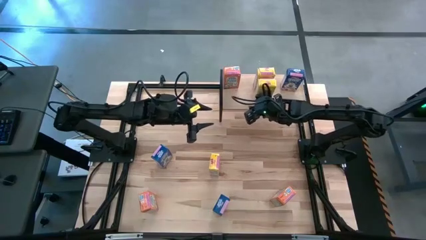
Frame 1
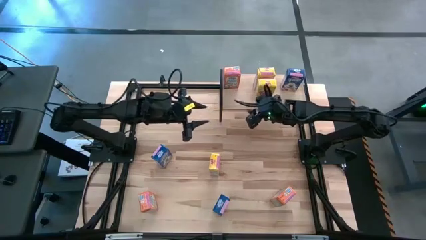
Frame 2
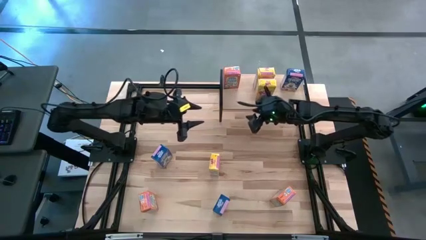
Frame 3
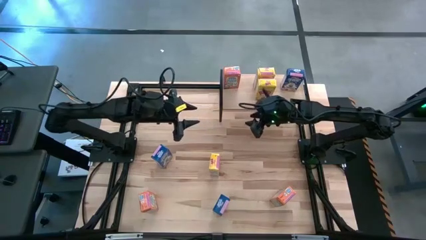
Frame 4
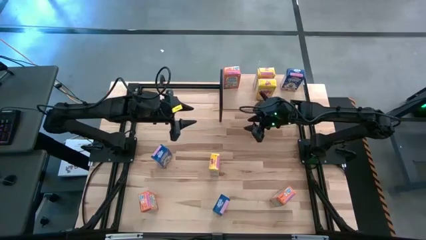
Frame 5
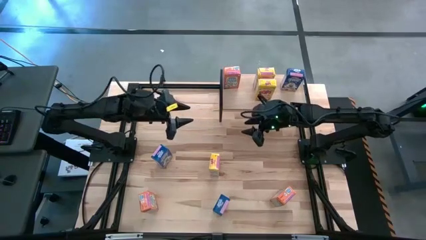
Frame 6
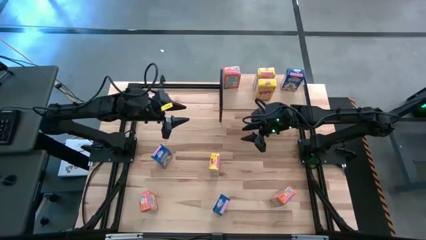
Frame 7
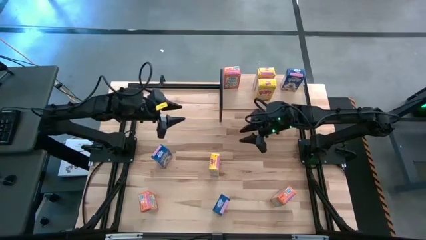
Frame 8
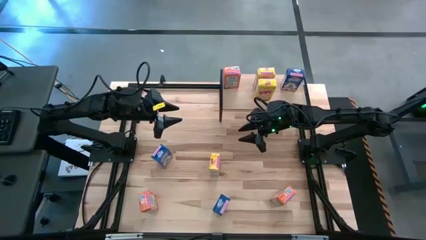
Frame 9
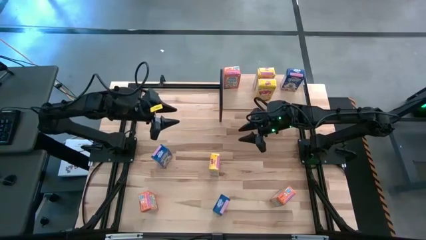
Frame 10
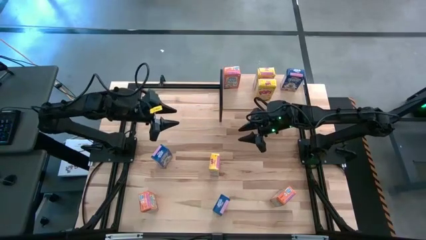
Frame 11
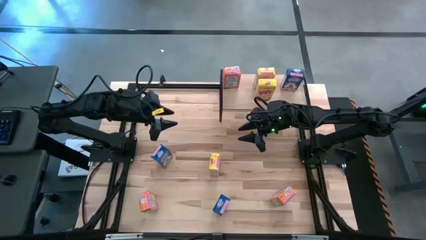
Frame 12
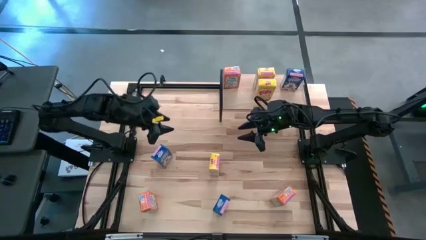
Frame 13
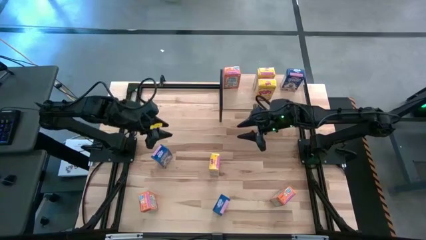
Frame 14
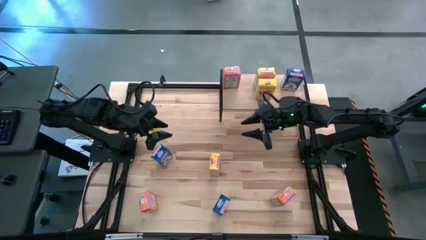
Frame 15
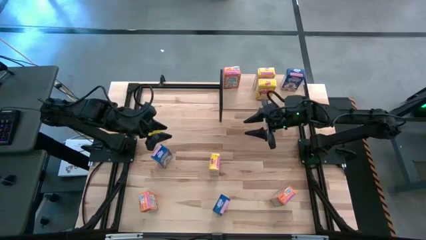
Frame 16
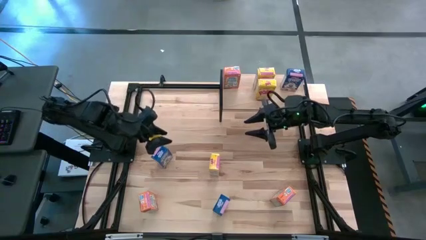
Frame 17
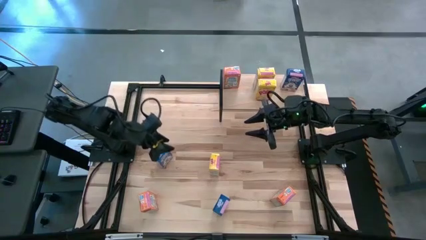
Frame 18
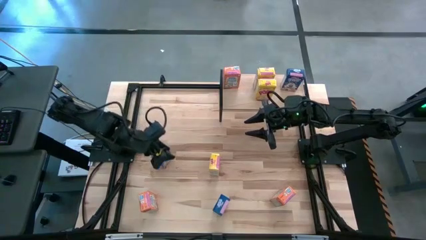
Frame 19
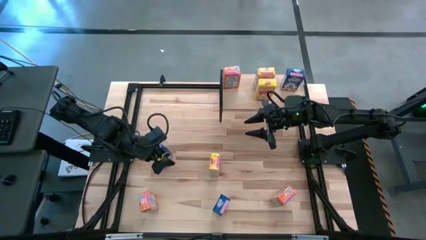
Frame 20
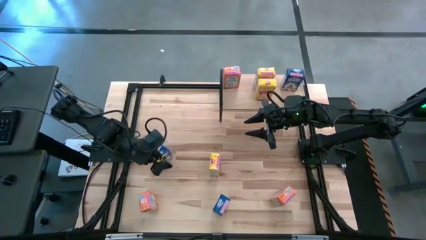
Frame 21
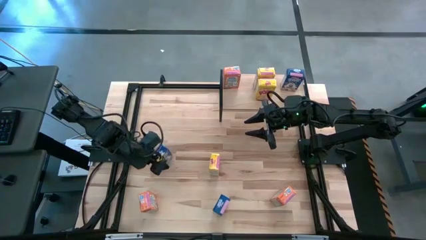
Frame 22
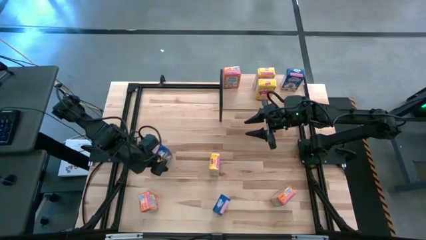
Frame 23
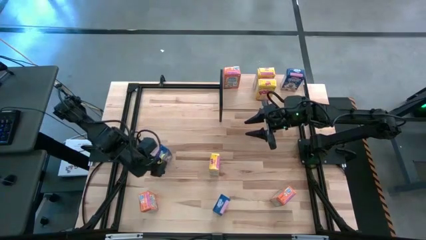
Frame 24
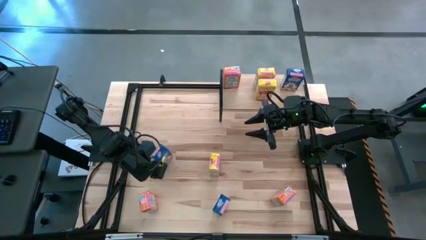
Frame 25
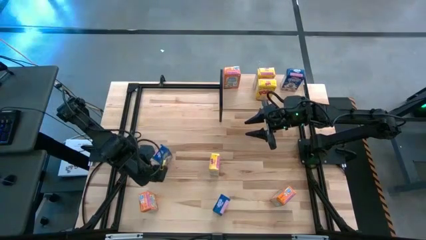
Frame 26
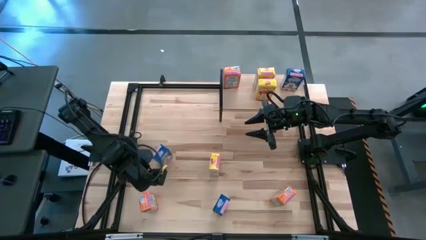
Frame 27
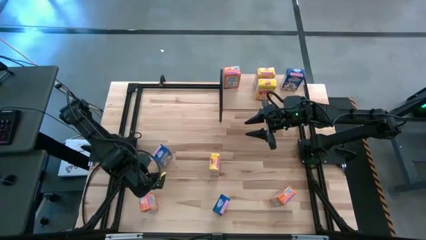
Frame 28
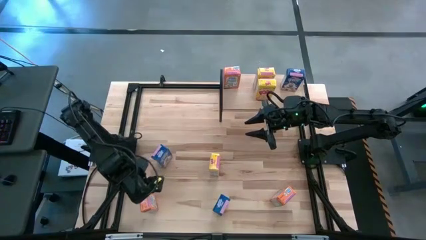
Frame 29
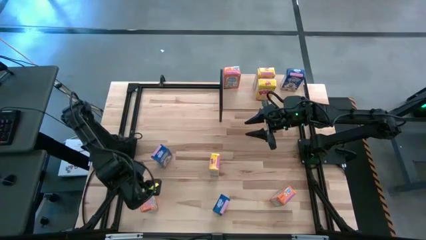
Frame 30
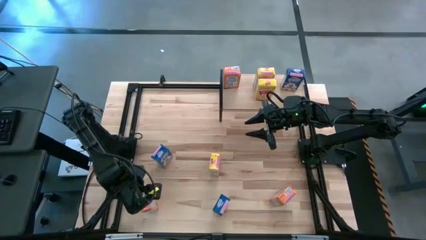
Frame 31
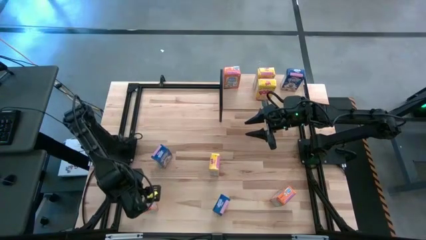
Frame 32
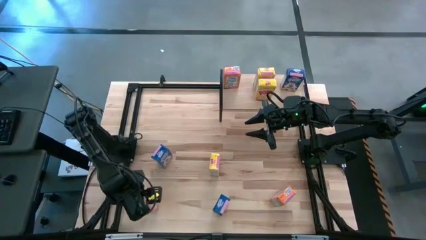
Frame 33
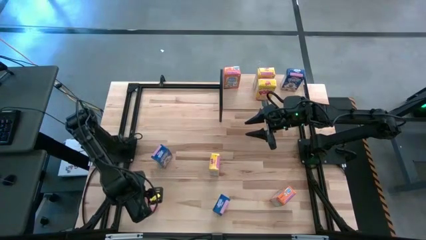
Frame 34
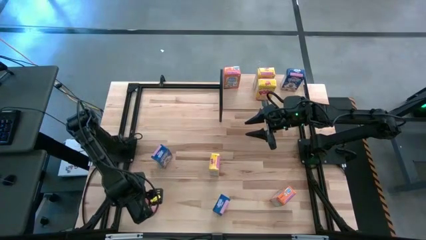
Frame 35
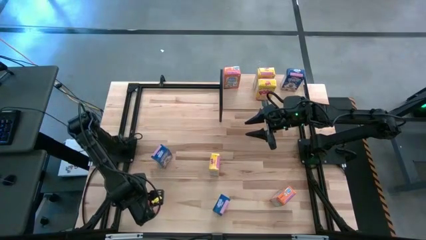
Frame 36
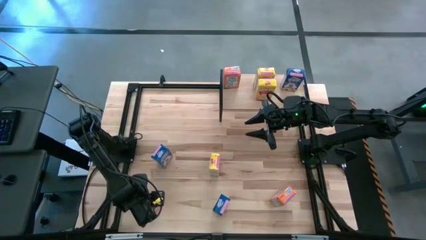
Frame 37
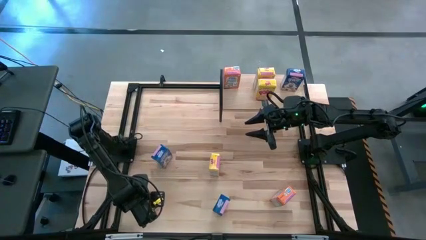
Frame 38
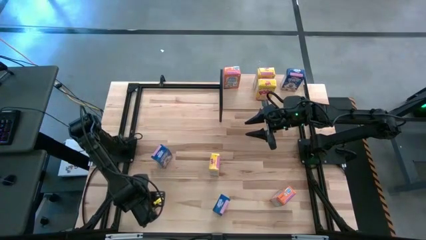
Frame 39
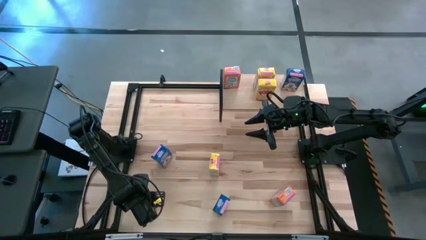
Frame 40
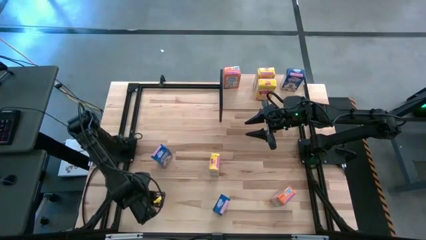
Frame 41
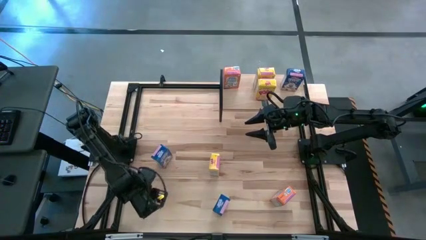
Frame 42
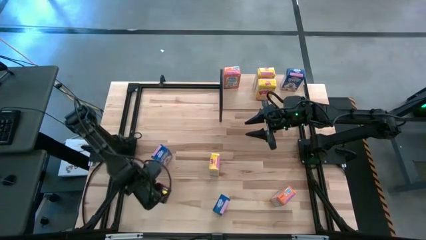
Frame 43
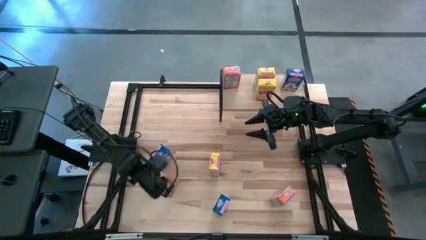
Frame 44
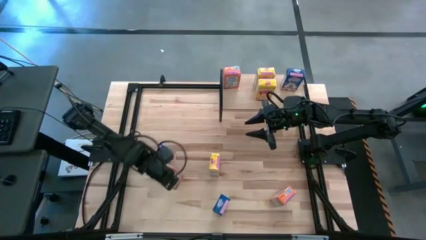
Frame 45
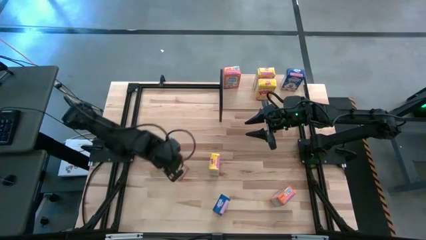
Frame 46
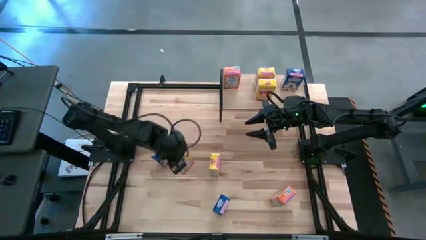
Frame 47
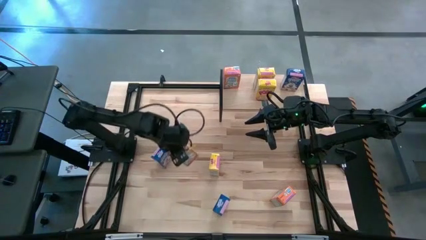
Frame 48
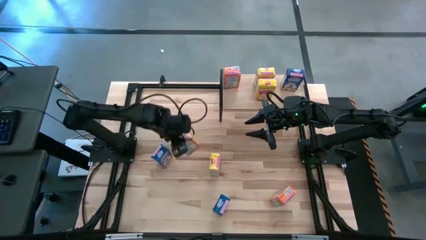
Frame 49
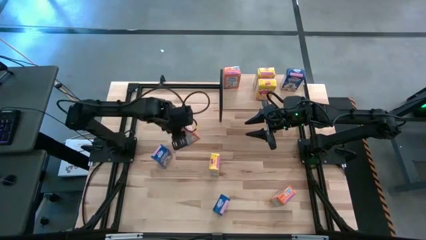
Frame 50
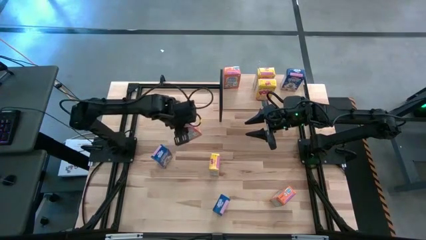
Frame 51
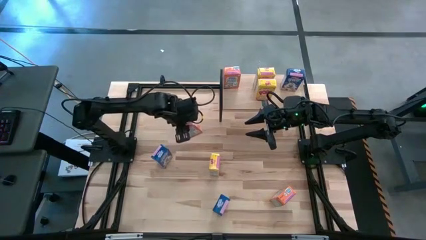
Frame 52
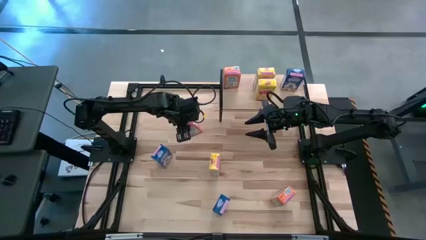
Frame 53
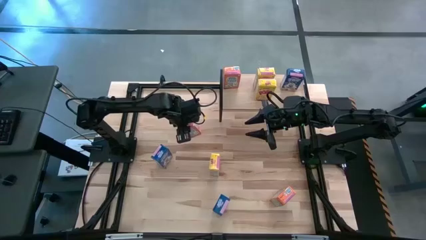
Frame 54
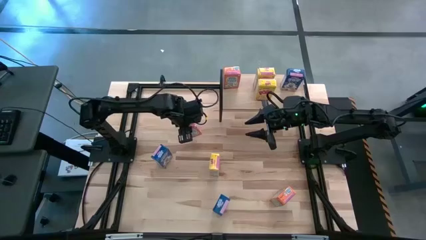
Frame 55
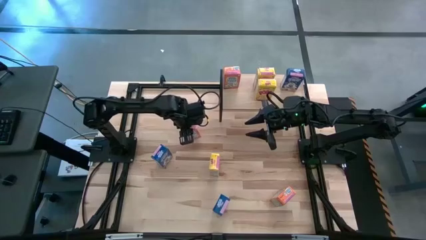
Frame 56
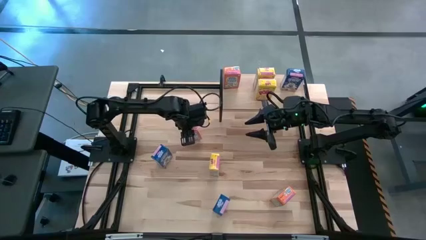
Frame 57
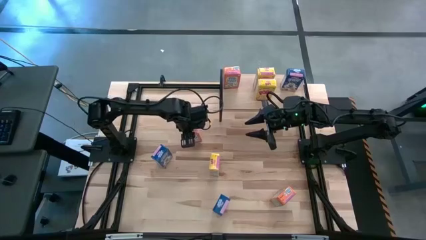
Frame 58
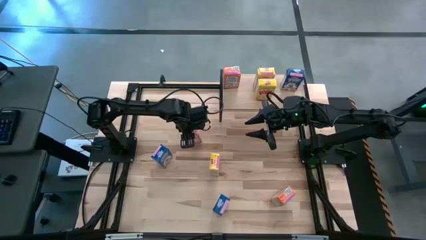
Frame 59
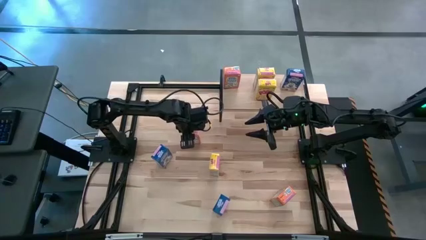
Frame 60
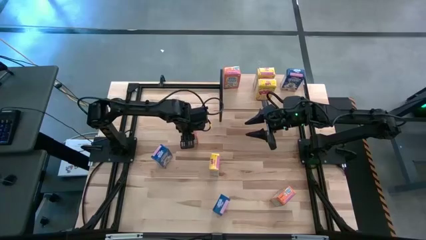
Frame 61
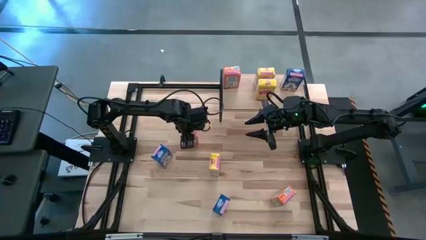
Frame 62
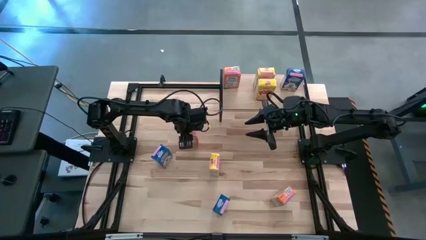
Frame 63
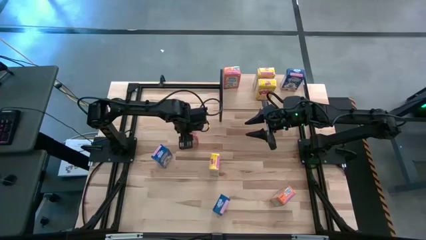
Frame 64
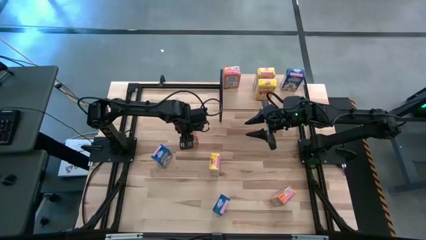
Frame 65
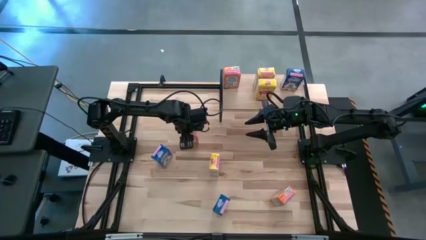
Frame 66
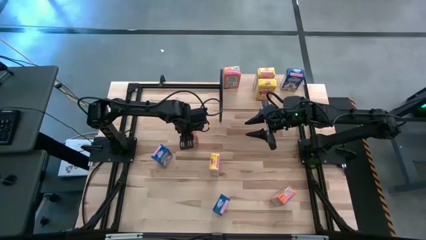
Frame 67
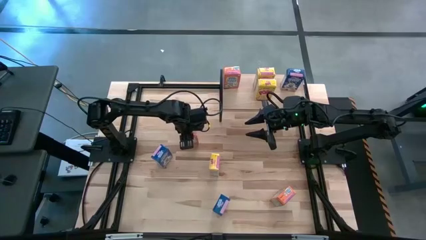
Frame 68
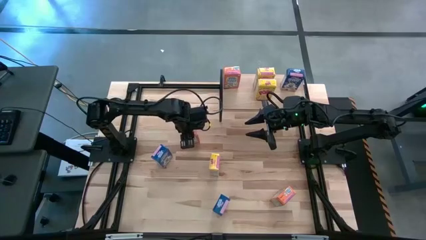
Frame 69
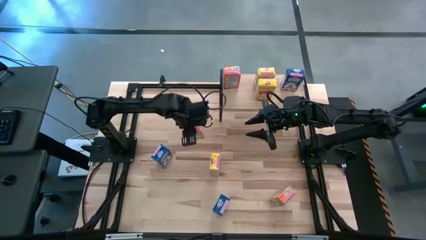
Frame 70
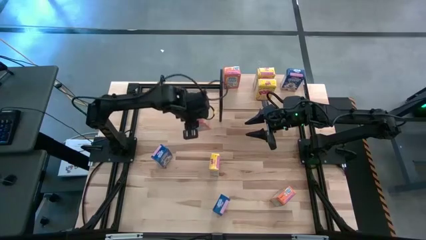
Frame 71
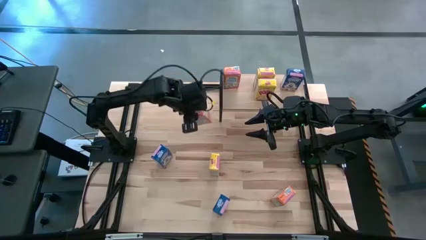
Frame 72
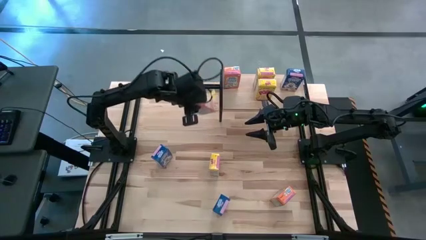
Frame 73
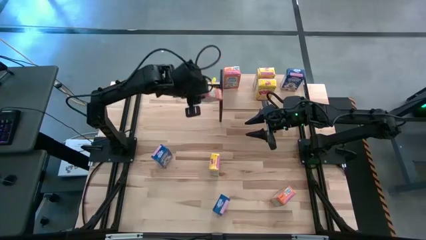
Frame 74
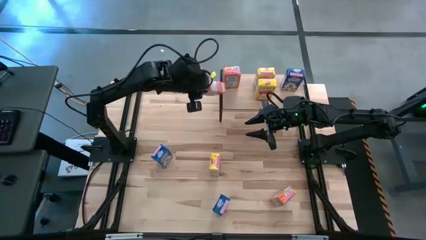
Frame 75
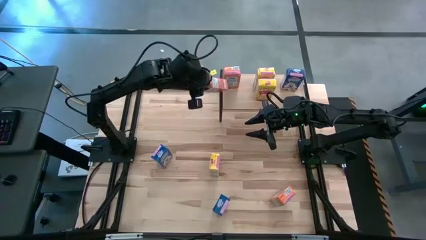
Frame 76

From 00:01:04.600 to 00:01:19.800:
Task: Stack cereal on shelf
Put the left orange cereal box on the shelf aligned with the orange cereal box

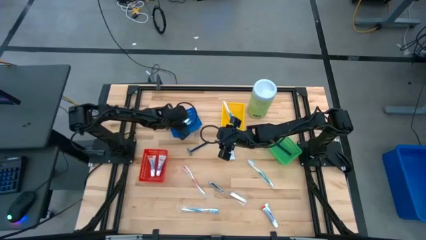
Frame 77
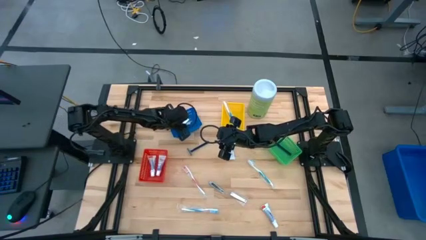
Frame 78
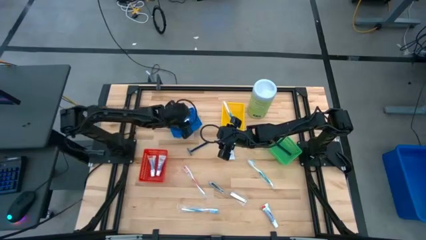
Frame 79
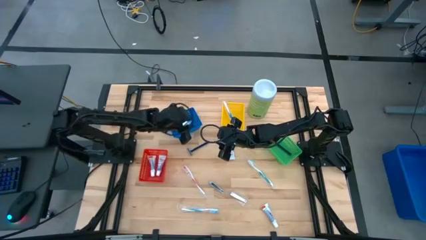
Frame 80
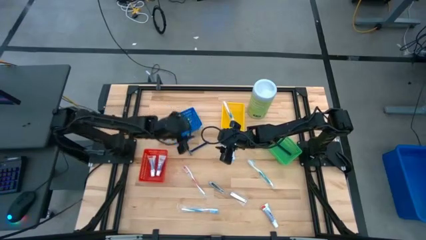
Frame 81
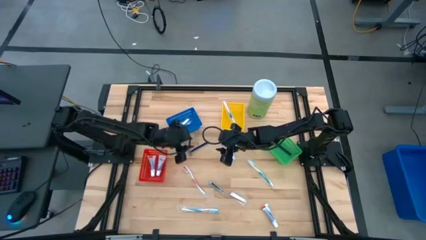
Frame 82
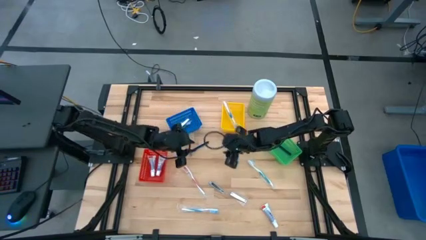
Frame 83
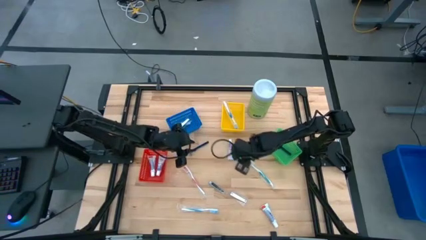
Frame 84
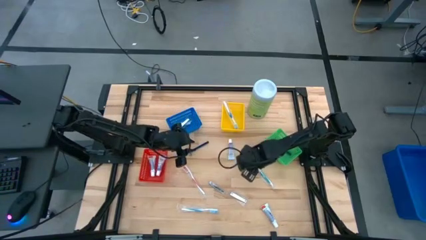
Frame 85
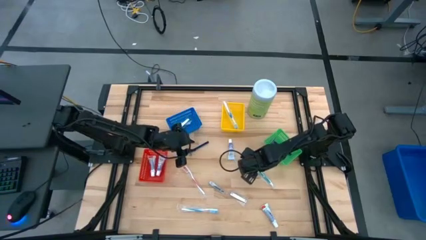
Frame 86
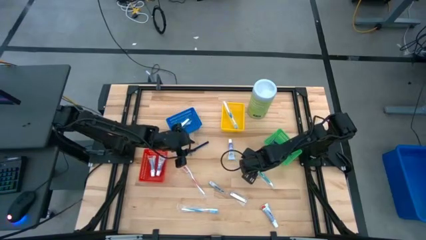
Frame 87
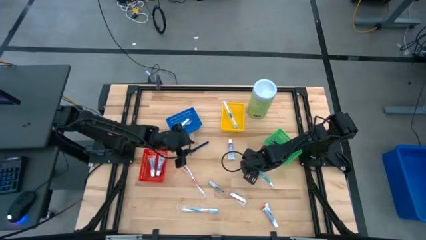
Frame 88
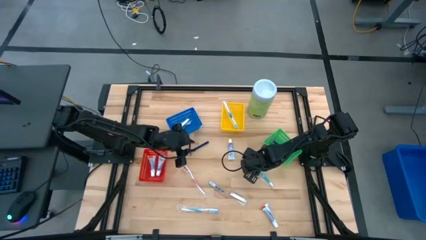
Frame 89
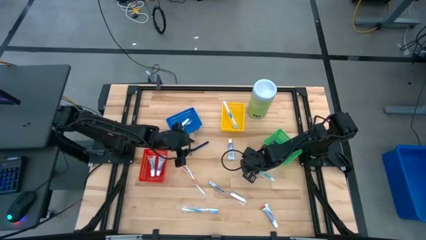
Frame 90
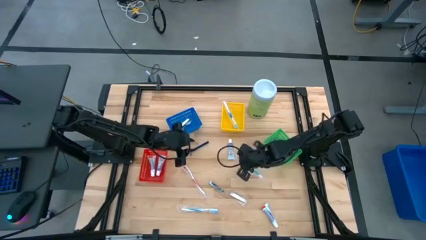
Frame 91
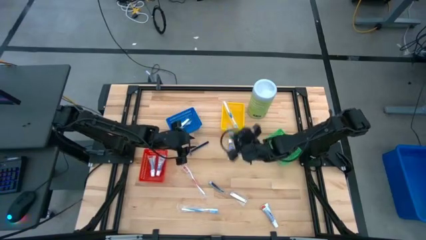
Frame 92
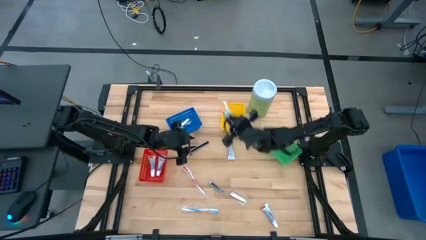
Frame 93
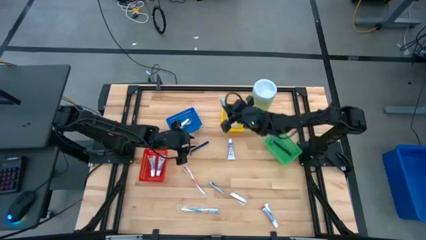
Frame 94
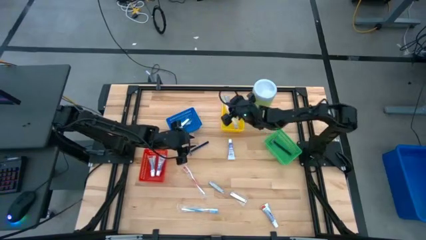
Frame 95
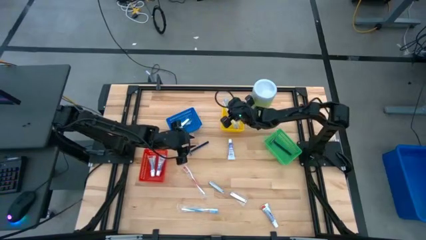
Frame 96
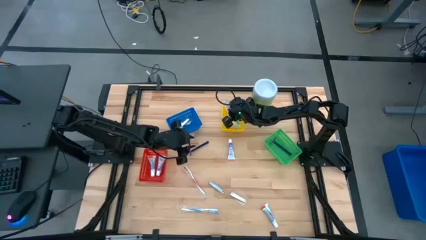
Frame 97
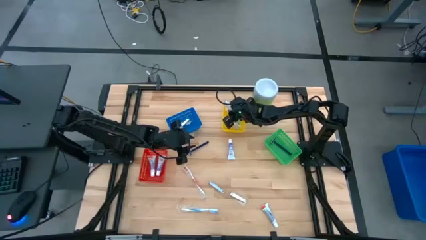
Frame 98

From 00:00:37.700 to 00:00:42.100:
Task: Pick & Place Travel size toiletries
Put the blue toothbrush into the yellow basket
